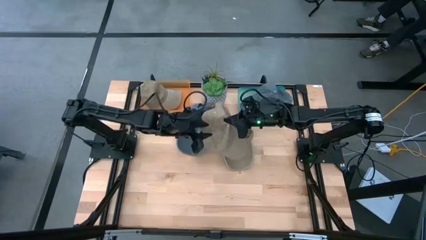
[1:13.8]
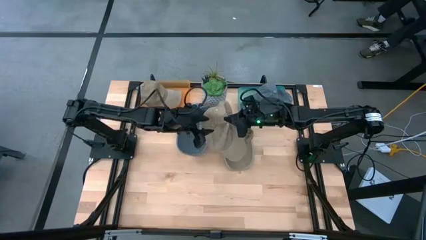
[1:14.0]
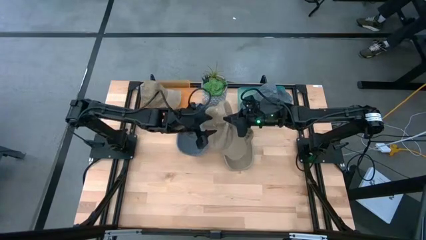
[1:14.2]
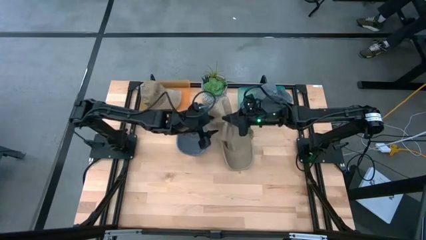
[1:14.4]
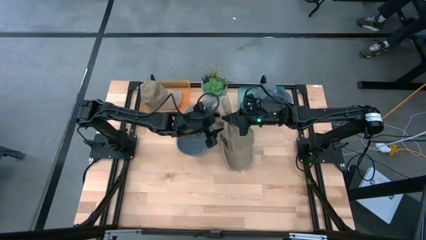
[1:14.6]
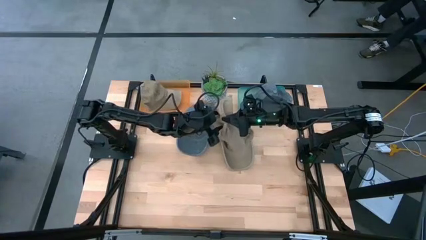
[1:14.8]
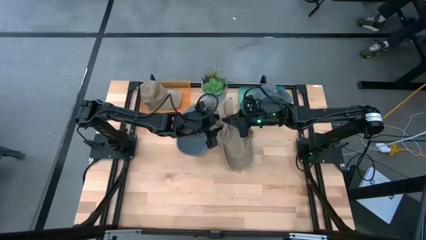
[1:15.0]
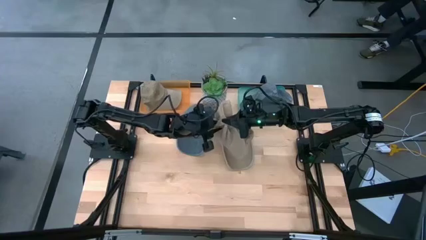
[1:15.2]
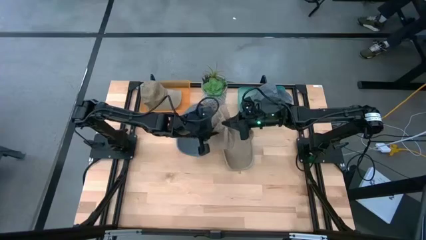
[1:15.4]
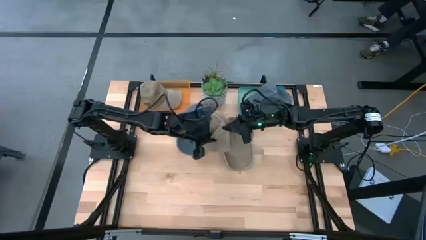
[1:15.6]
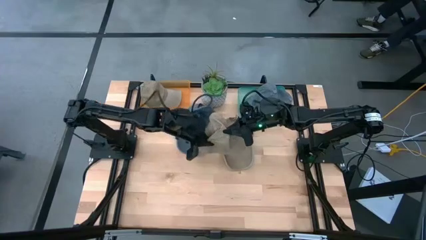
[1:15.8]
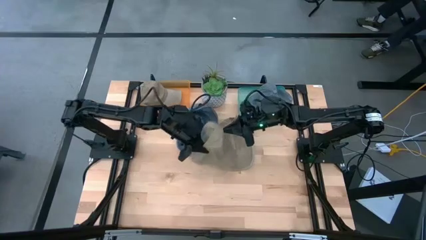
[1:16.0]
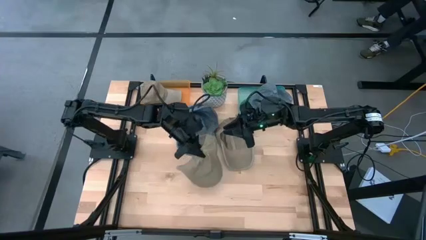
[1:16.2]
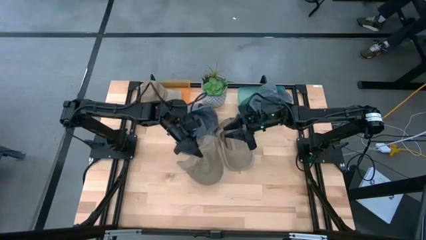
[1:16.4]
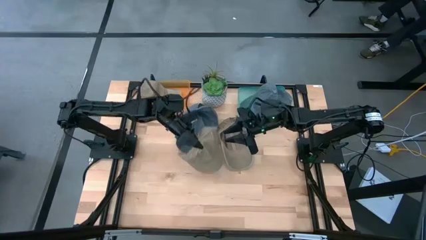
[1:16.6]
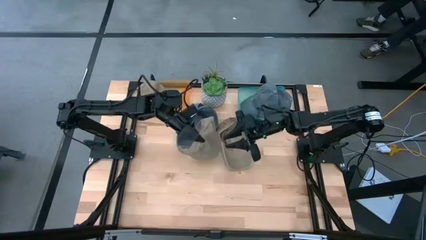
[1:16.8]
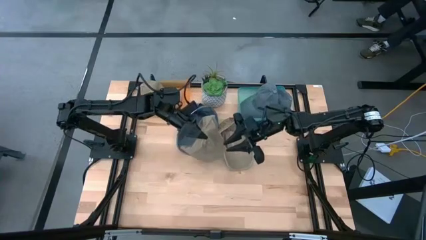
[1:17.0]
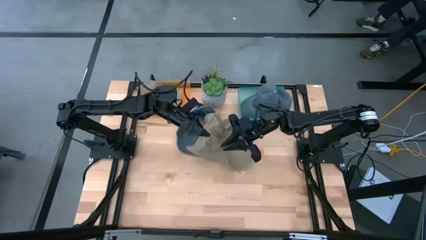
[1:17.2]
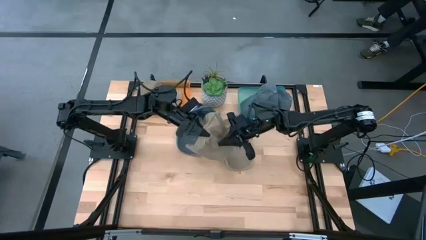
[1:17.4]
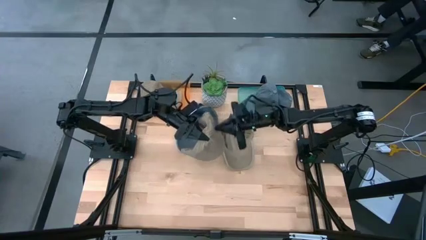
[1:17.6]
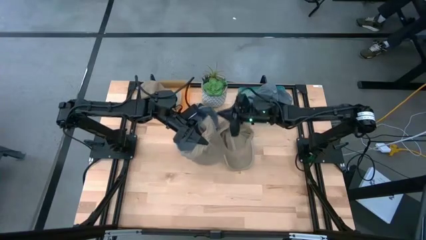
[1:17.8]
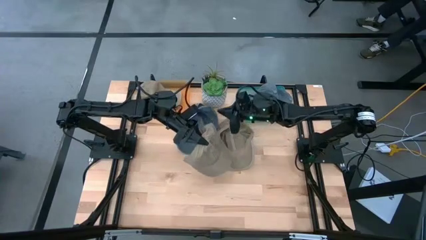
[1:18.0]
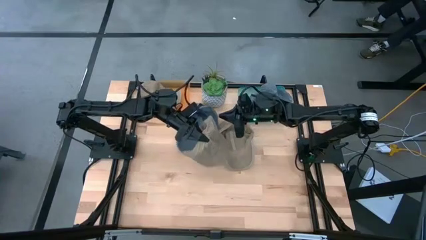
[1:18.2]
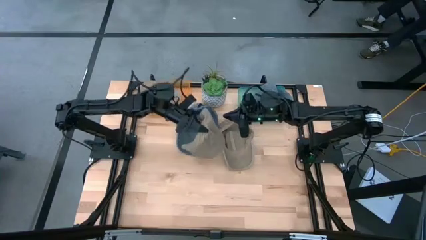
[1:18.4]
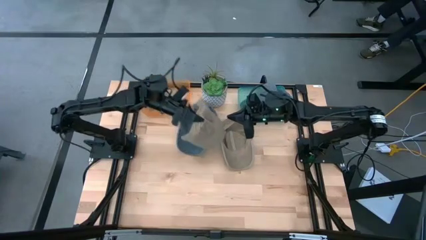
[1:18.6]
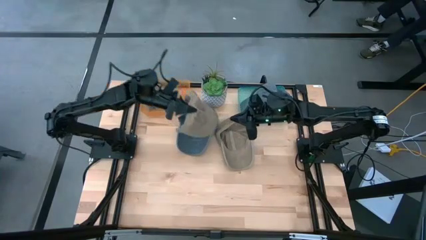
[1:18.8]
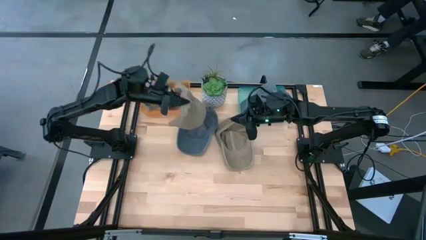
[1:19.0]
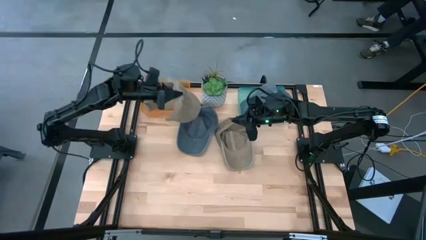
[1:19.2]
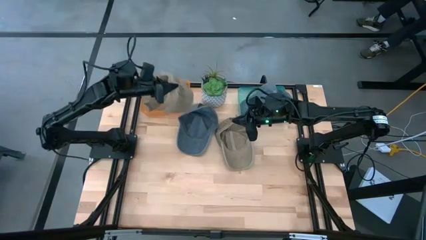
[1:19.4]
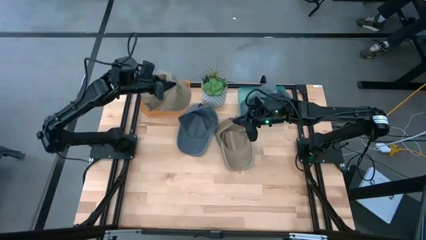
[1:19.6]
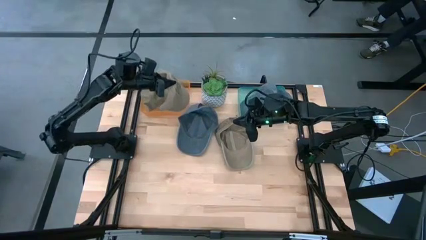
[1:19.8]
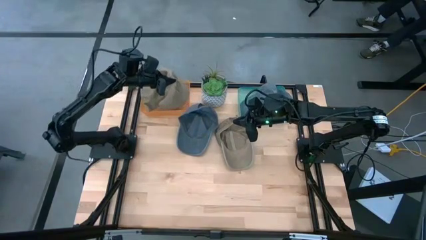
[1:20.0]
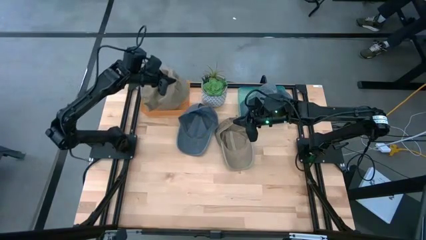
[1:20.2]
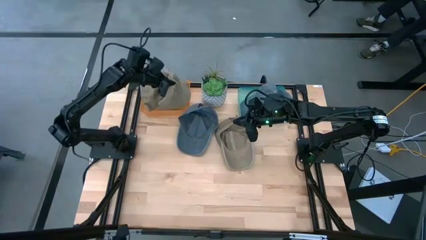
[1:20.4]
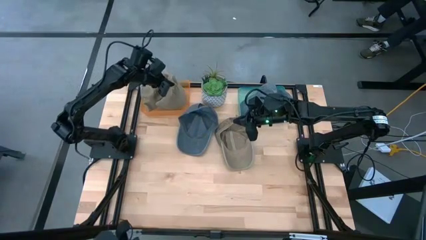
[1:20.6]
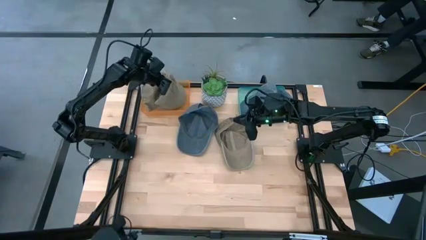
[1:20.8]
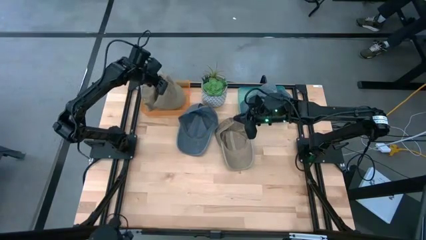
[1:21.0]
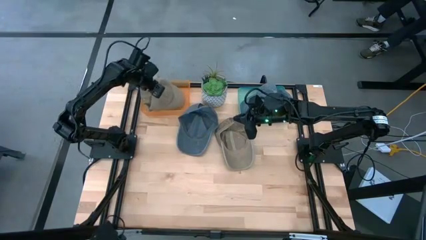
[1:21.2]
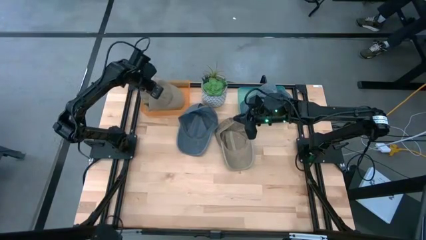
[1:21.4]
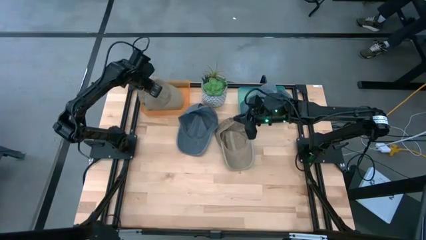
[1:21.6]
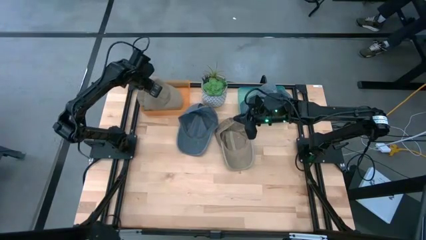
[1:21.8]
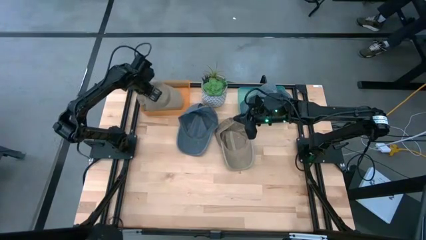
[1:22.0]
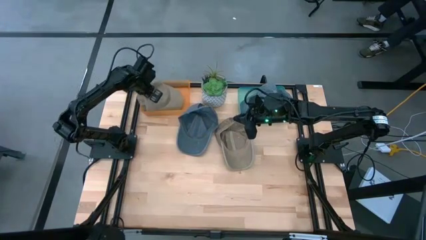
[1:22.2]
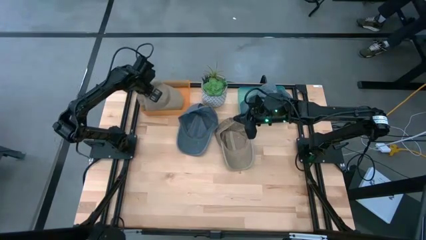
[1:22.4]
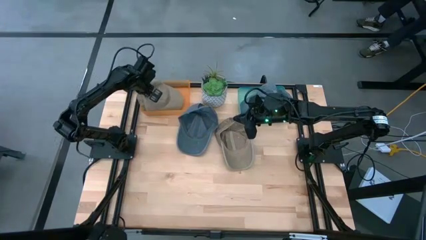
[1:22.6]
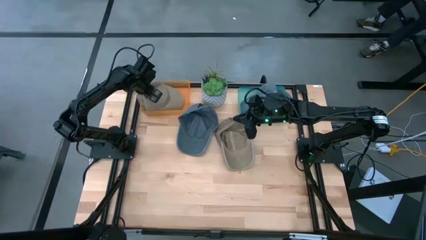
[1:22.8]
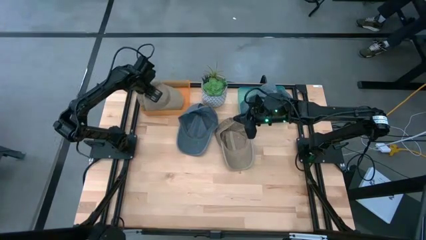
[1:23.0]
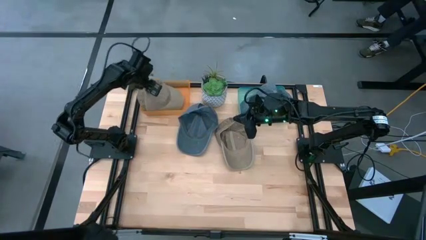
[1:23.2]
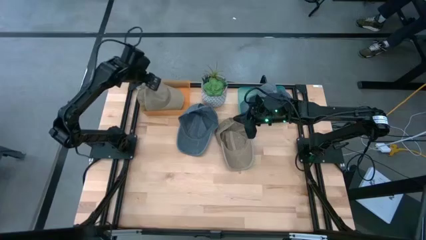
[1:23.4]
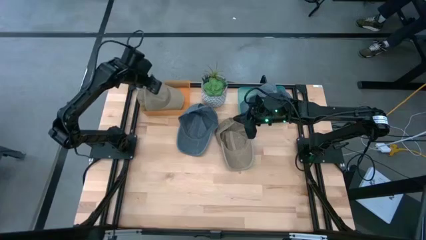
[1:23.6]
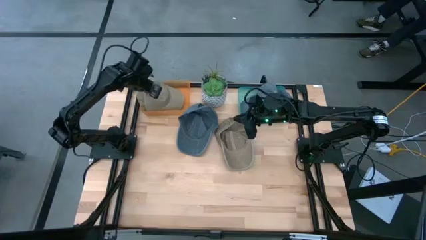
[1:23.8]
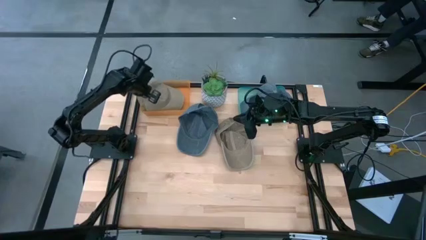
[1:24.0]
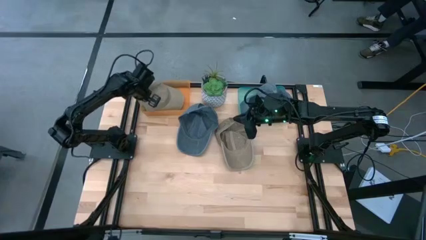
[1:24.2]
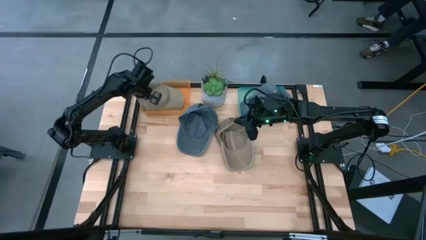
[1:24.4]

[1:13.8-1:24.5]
Task: Pick & Place hat
Put the left brown cap into the orange bin

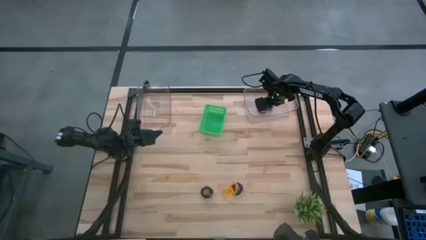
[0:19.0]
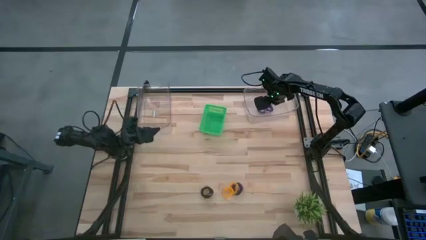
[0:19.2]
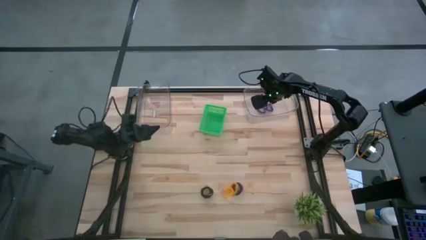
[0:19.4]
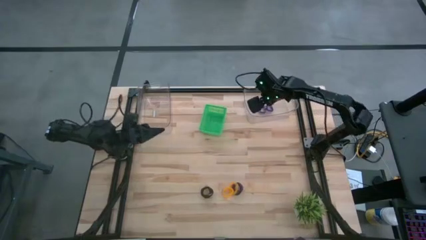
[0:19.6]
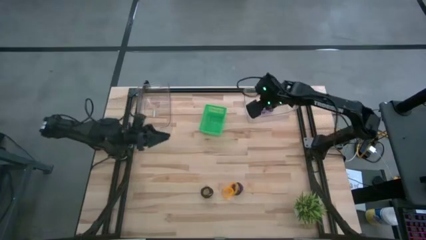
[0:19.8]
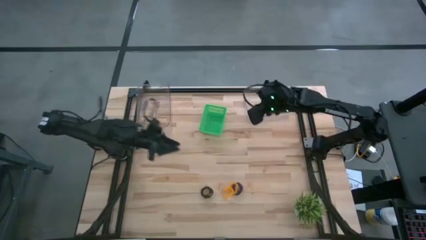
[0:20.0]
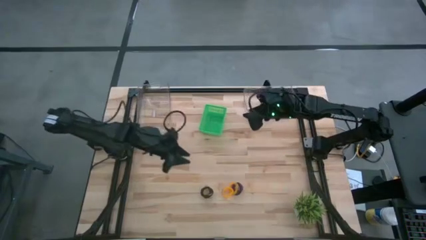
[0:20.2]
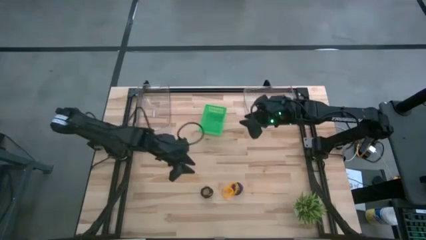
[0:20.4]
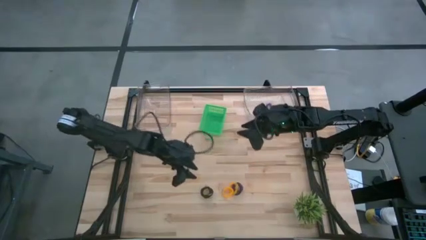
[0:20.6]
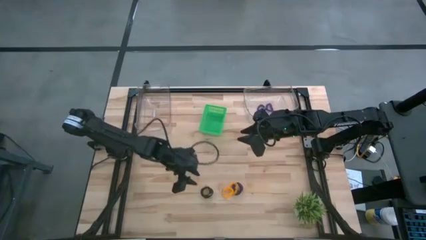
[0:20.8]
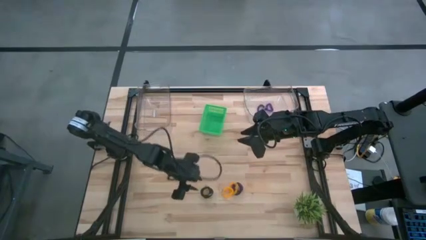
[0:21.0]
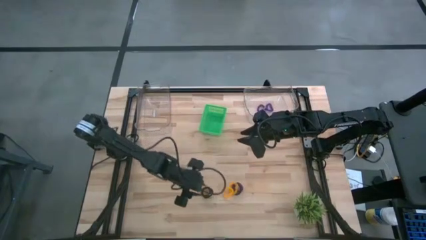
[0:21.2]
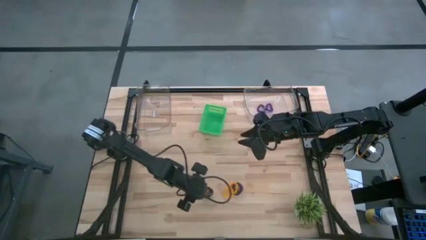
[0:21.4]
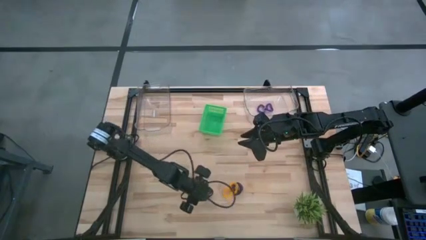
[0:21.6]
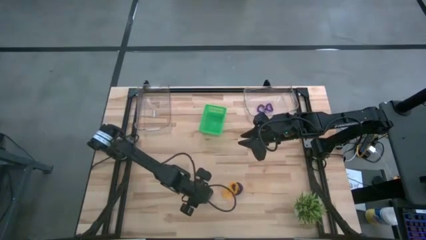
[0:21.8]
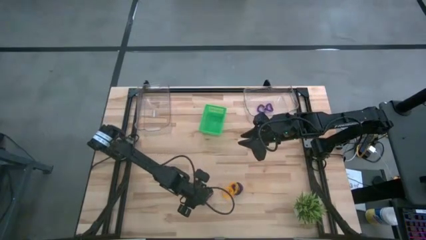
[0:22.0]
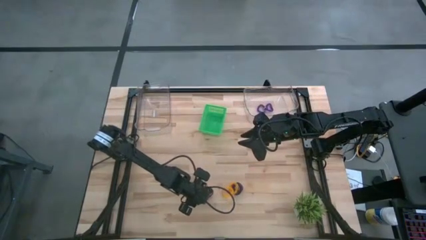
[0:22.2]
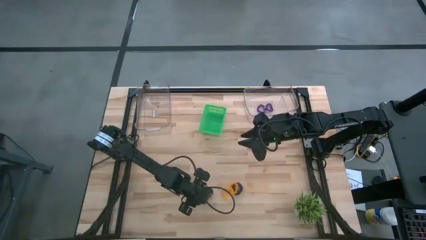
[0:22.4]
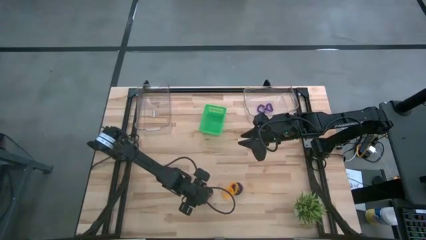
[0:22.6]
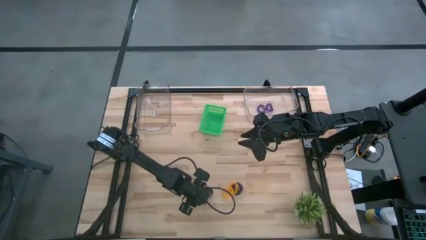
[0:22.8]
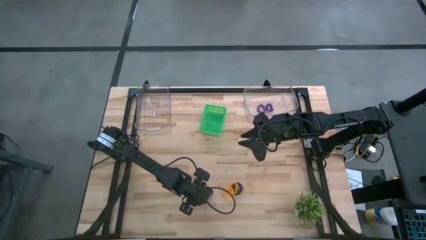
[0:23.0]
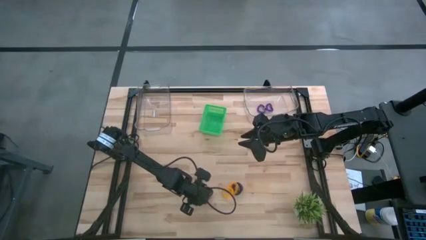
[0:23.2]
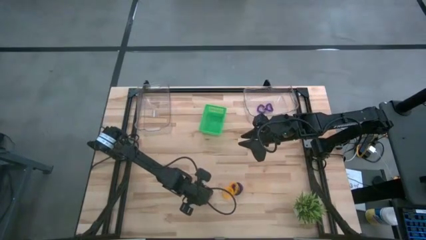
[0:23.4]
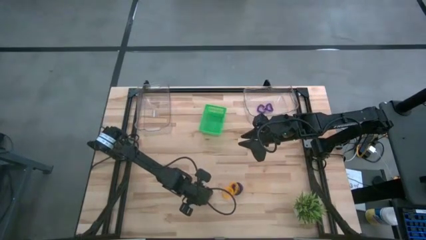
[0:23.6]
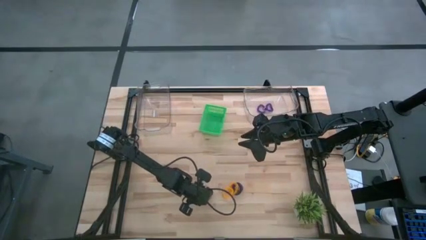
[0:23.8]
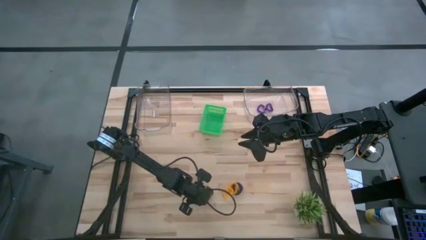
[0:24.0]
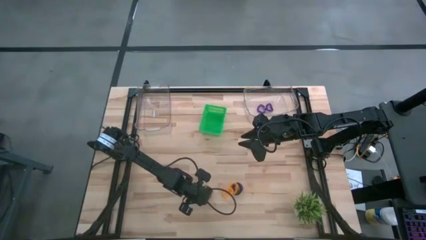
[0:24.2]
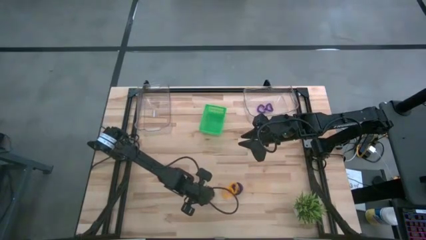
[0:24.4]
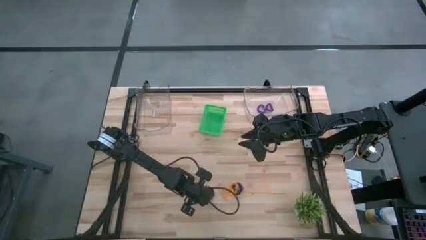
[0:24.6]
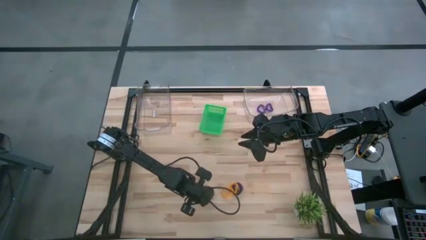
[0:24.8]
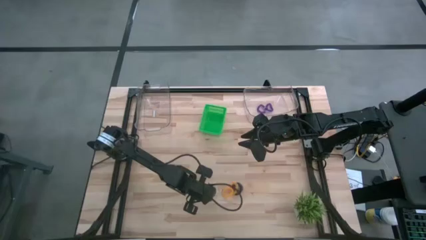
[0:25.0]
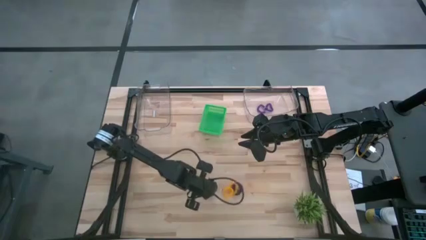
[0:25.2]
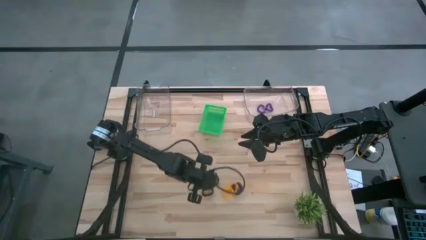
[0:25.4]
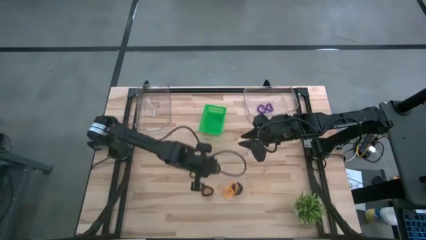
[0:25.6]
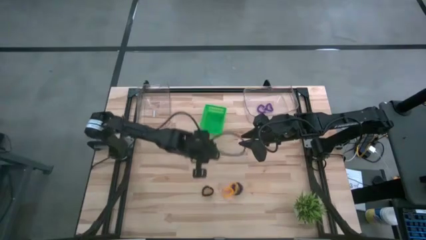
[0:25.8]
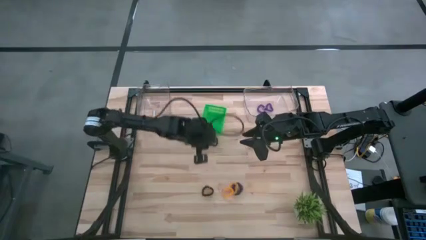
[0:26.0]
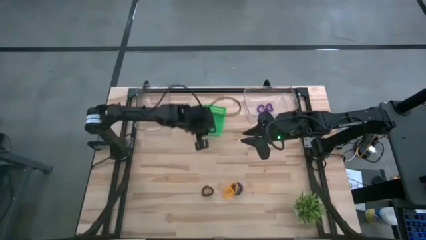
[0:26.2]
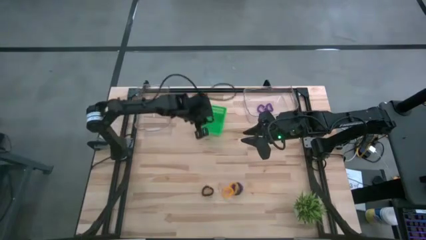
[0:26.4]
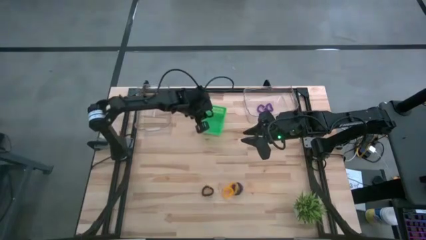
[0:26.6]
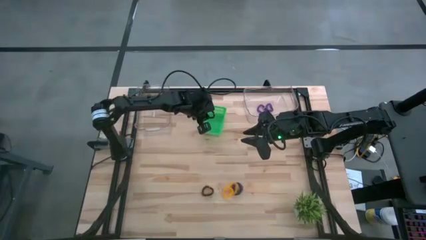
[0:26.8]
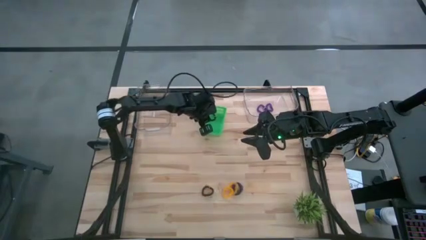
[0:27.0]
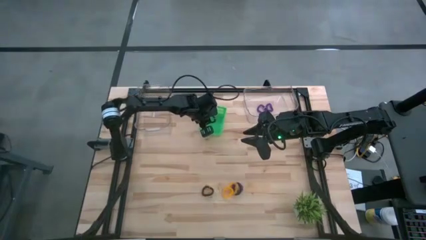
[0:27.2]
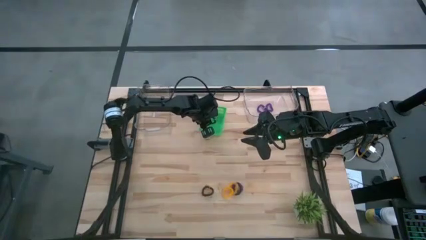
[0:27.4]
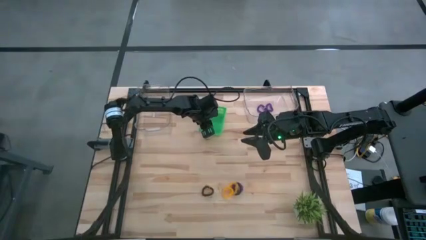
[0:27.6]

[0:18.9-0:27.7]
Task: Sort spring keychains
Put the black spring keychain into the green bin
